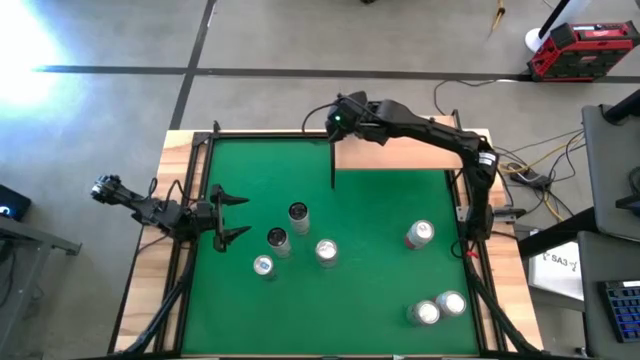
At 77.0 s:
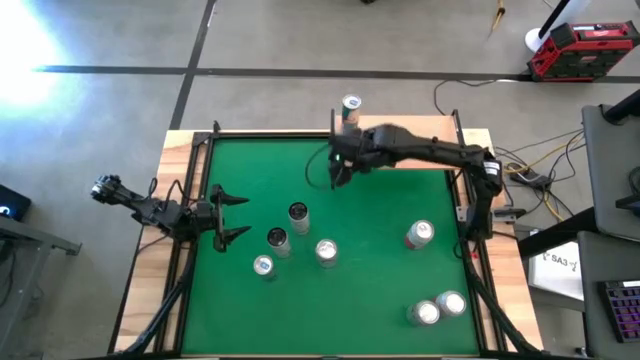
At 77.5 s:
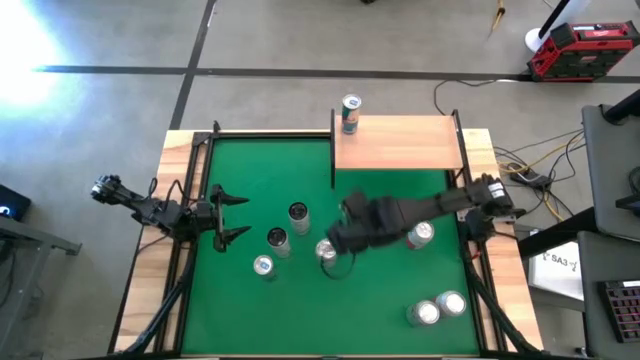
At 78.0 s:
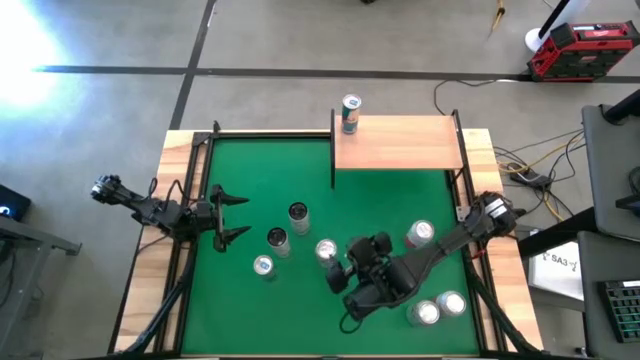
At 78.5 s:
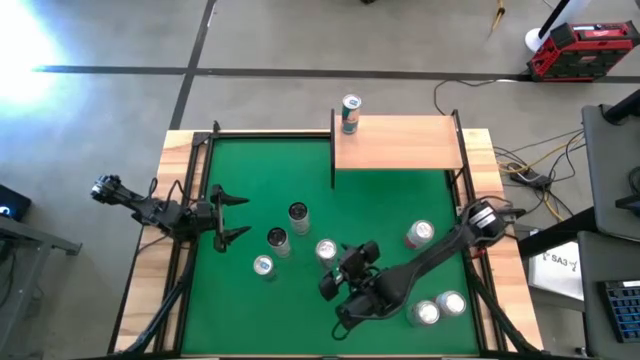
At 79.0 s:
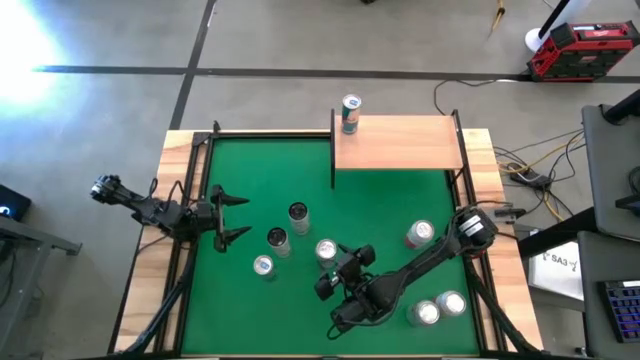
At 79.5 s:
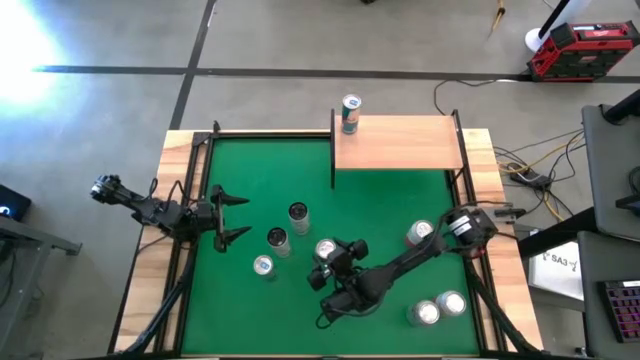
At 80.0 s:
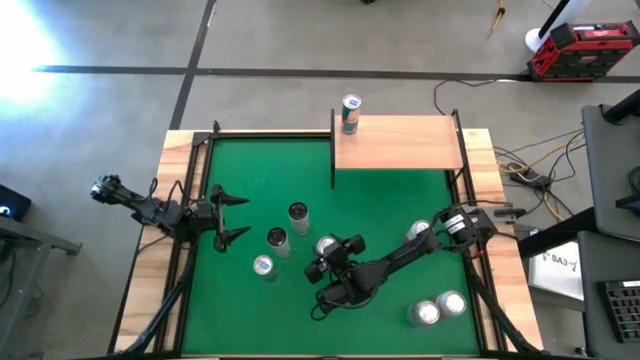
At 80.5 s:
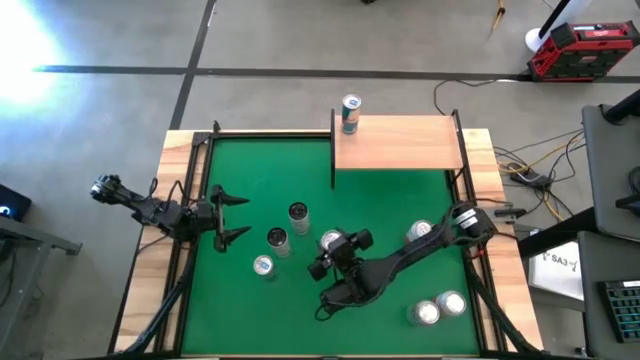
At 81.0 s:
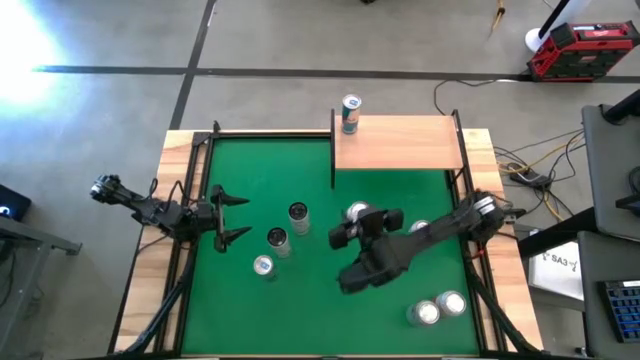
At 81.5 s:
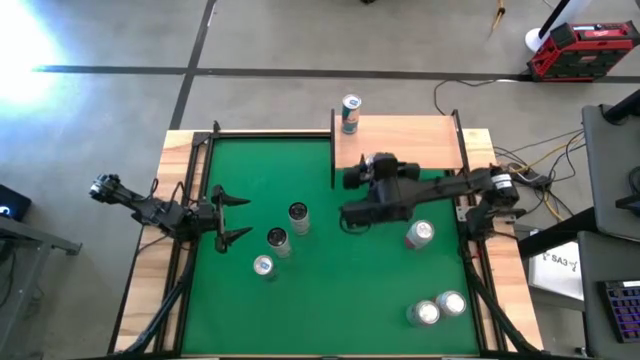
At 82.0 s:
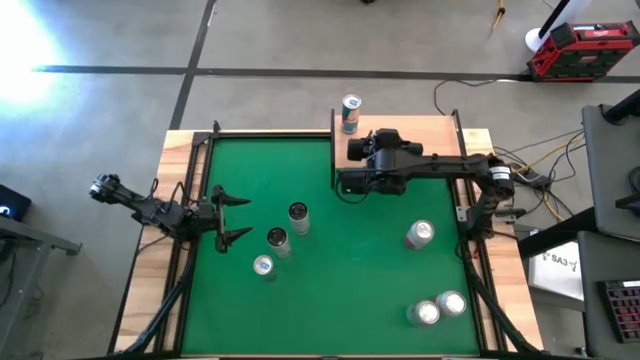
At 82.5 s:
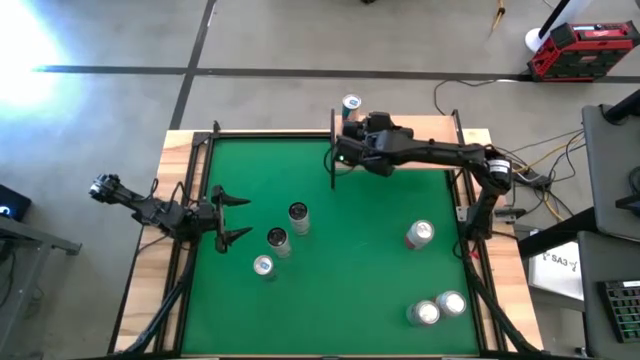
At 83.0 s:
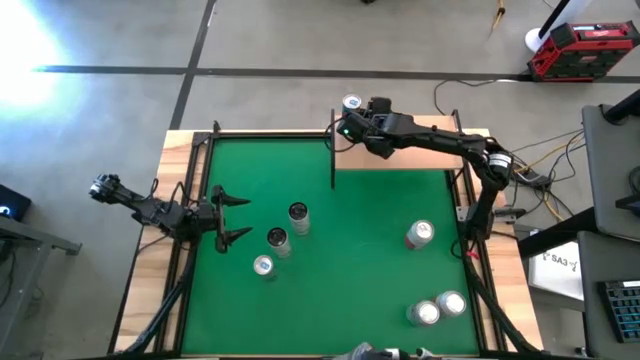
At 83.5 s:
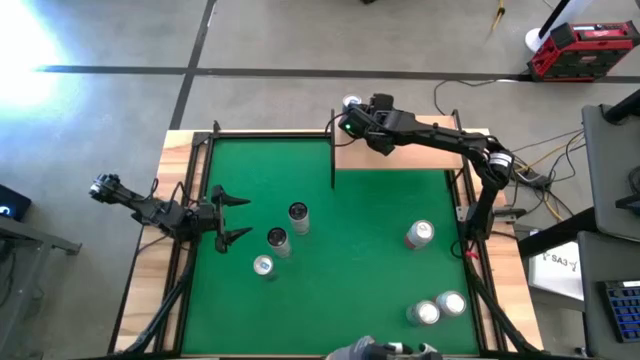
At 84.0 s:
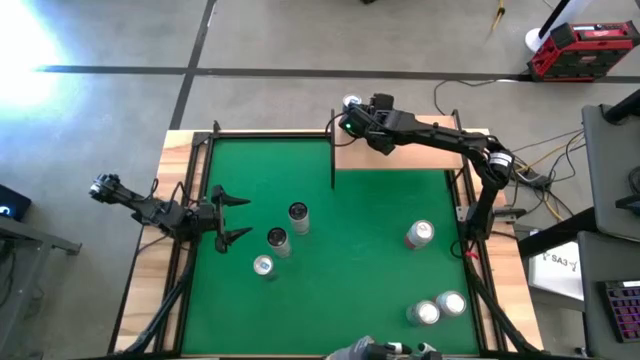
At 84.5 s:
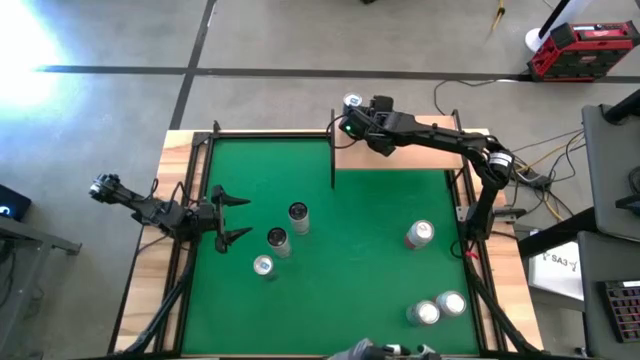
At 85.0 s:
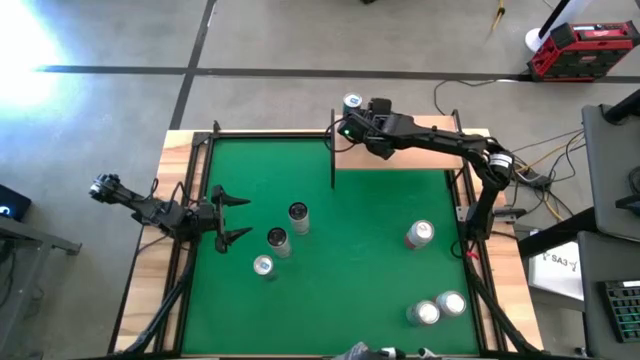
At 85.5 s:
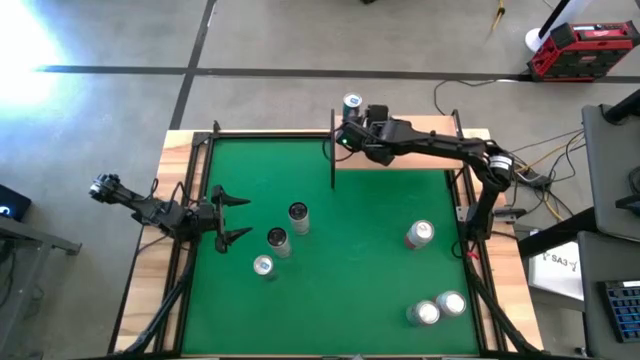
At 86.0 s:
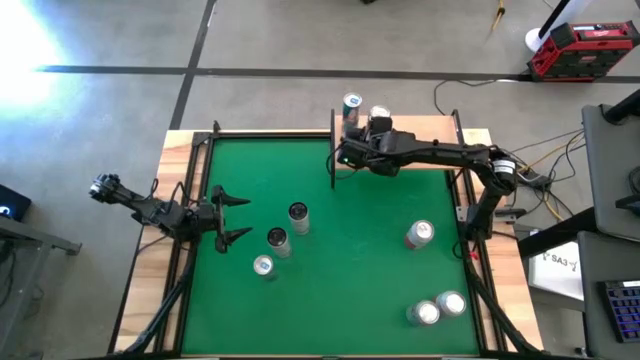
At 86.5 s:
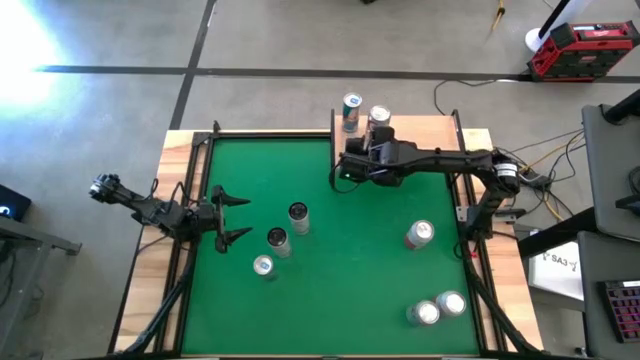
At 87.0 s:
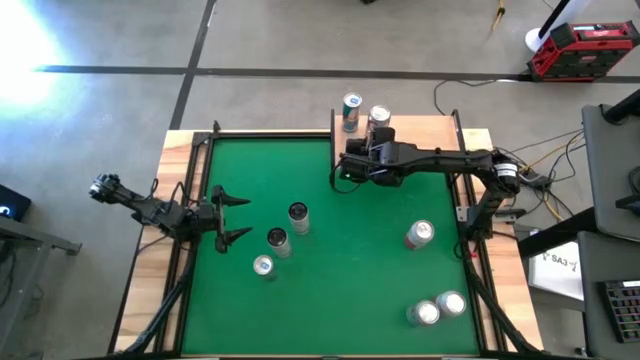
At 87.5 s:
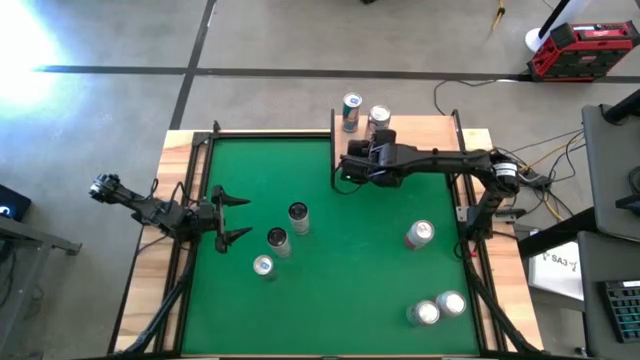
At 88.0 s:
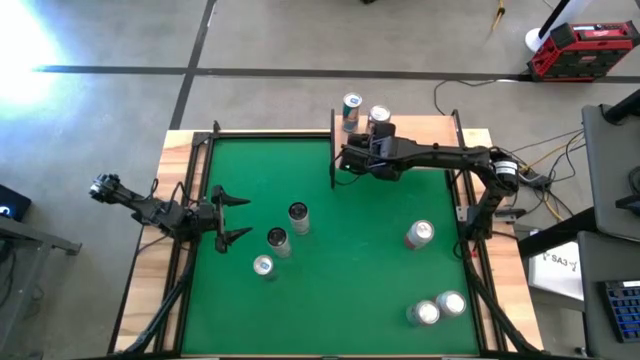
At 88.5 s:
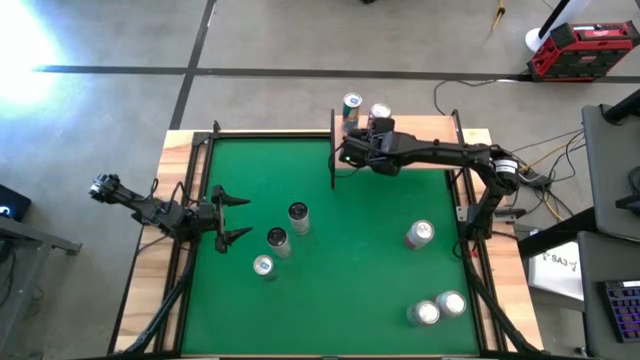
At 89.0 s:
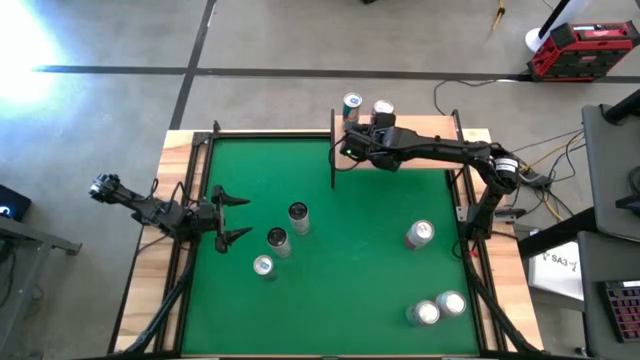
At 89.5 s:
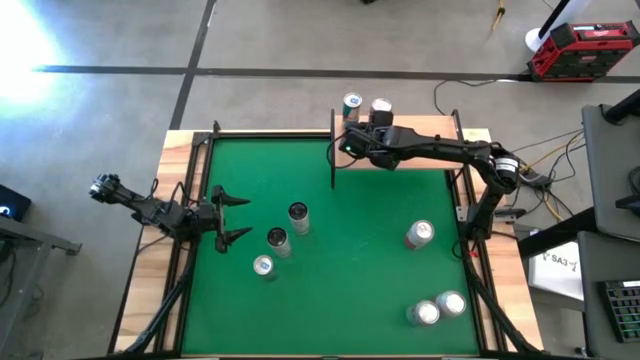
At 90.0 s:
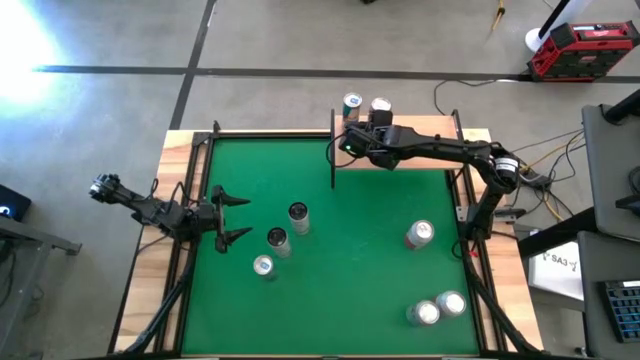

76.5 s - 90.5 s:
Task: Place canned beverage on shelf
Put the top red-silver soda can on the shelf

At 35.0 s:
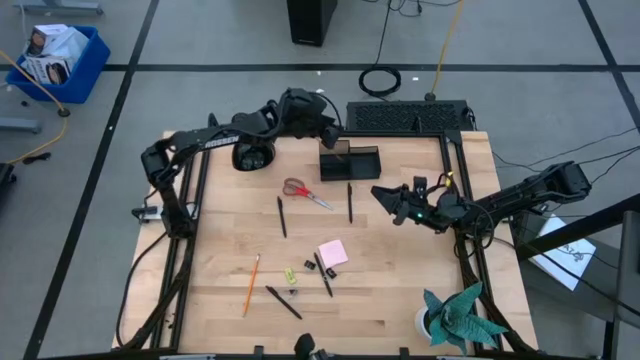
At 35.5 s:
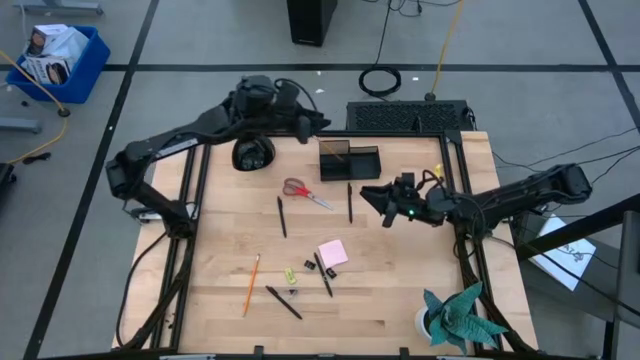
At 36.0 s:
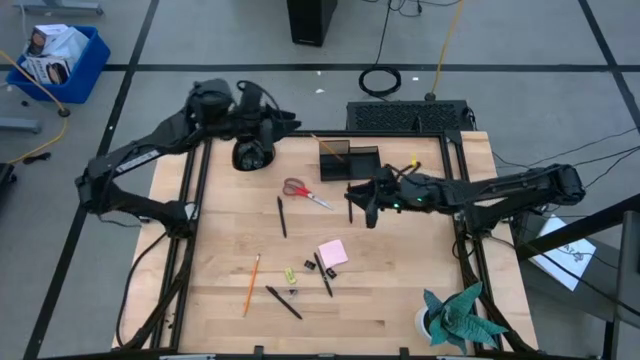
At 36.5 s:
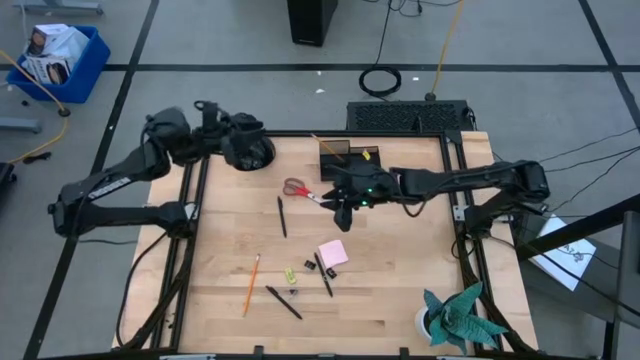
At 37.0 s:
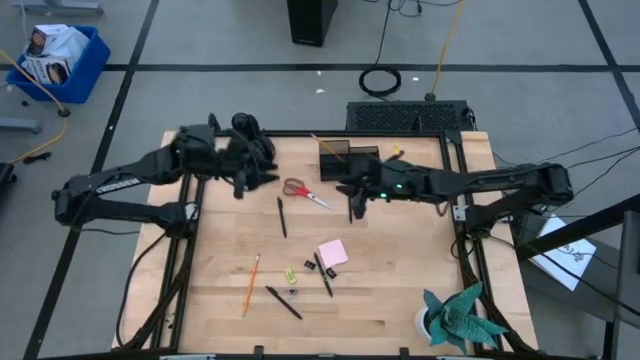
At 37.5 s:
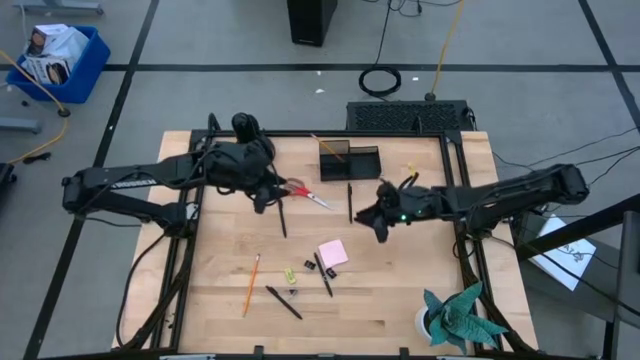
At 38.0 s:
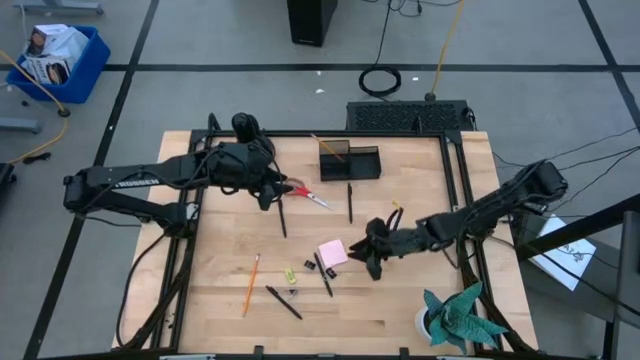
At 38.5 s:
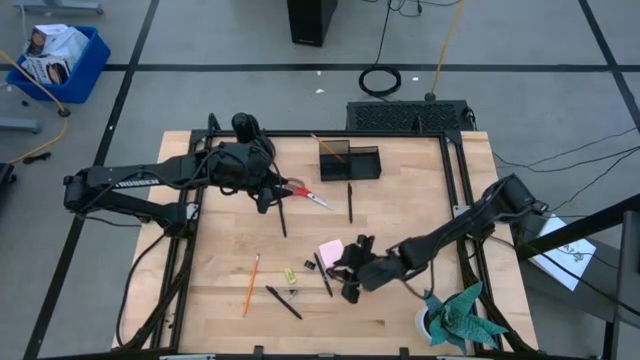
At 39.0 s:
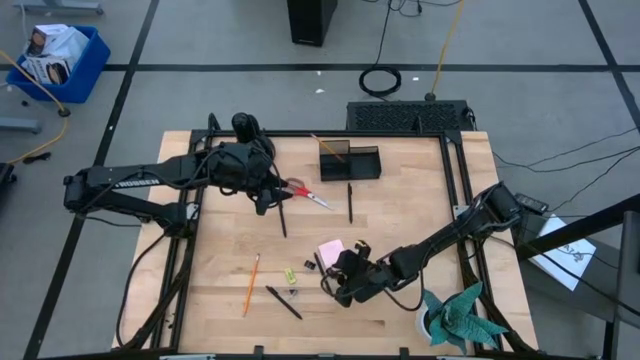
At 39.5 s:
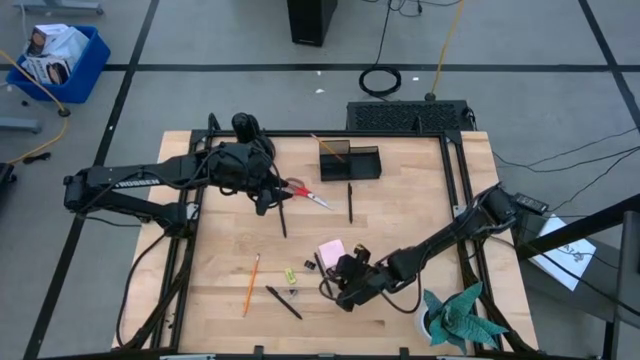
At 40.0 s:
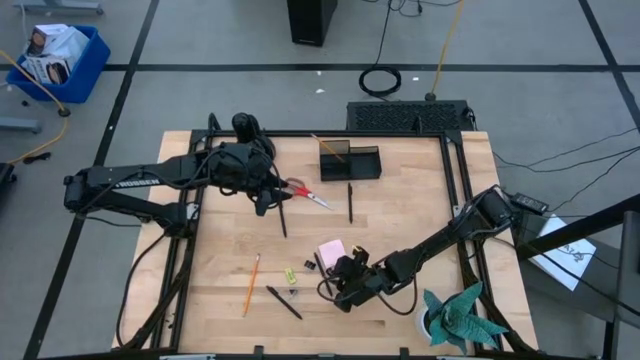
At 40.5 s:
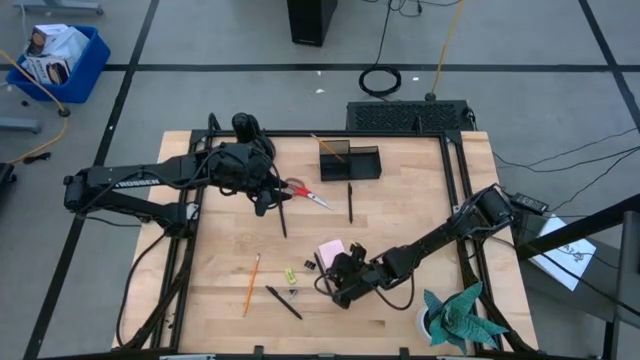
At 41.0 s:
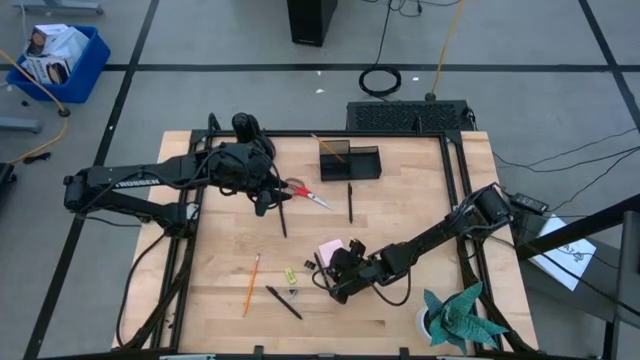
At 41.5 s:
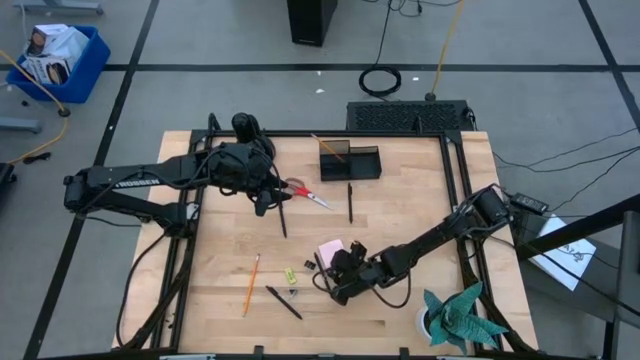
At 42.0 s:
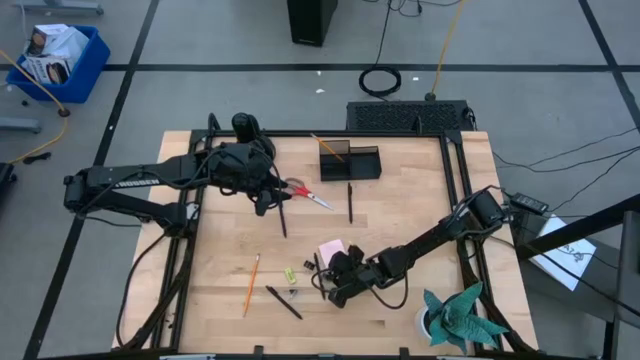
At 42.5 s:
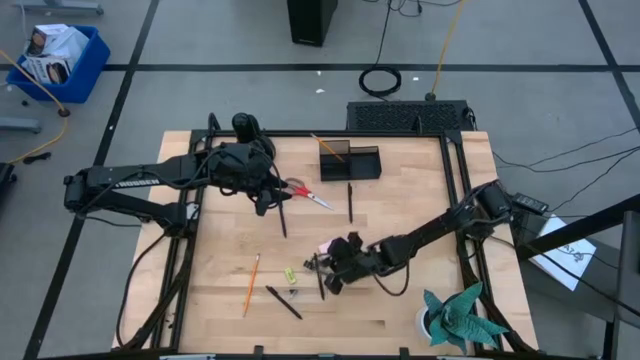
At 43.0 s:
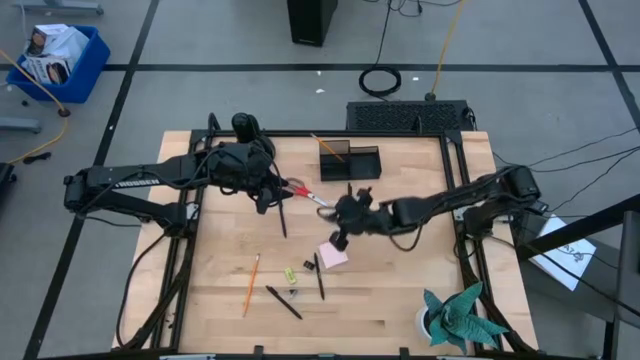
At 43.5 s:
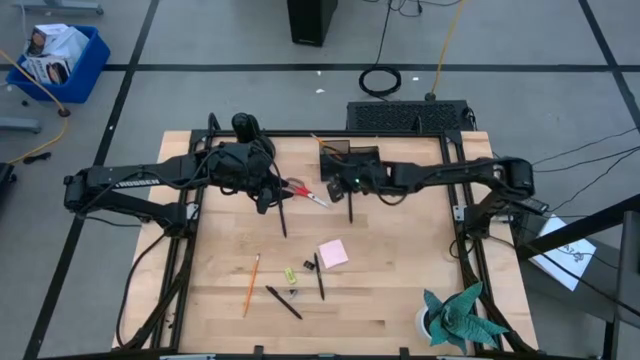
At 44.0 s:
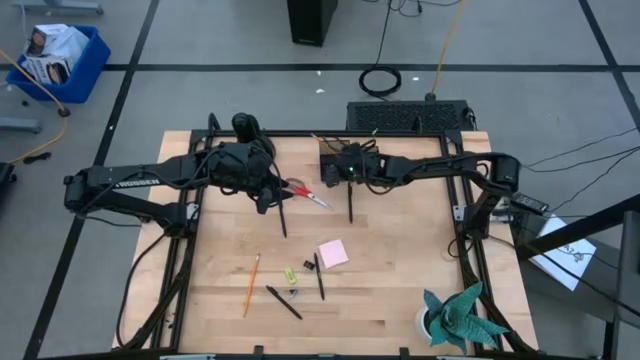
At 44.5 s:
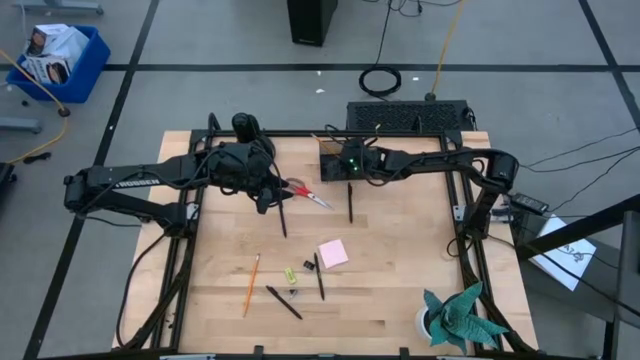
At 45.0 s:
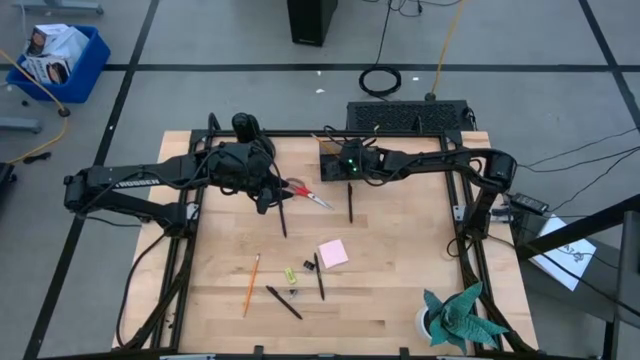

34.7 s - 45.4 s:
Task: Pick and place office supplies into organizer
Put the black binder clip into the black desk organizer
